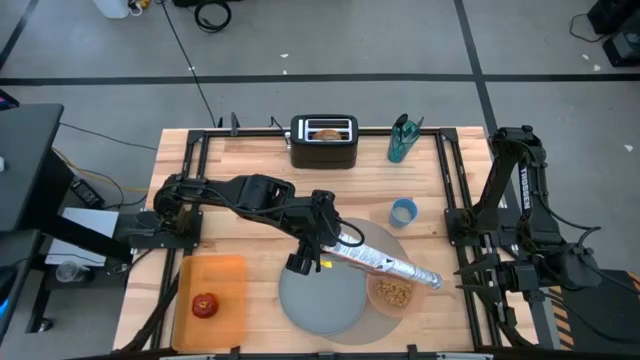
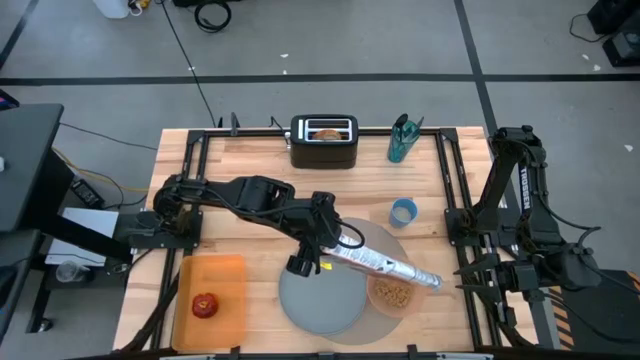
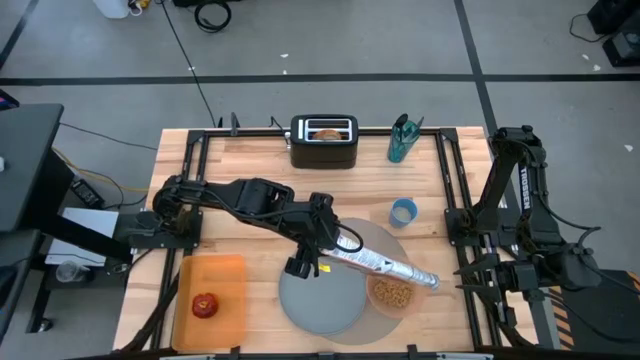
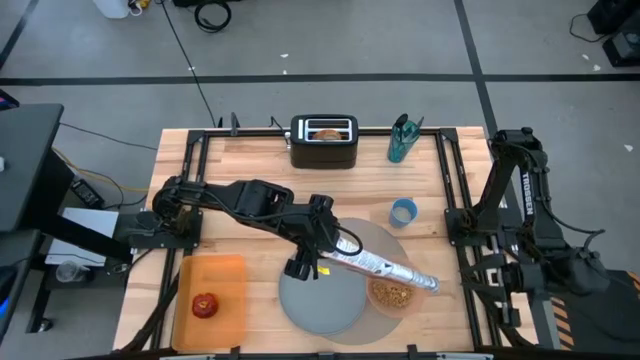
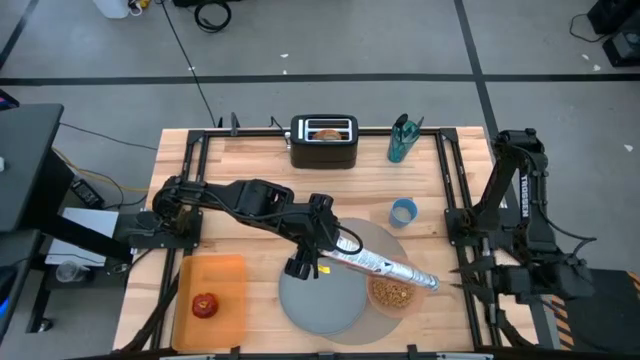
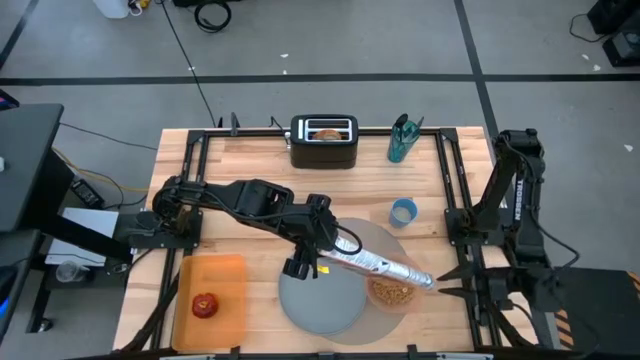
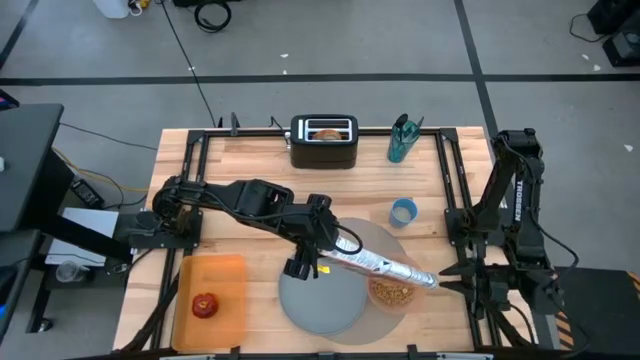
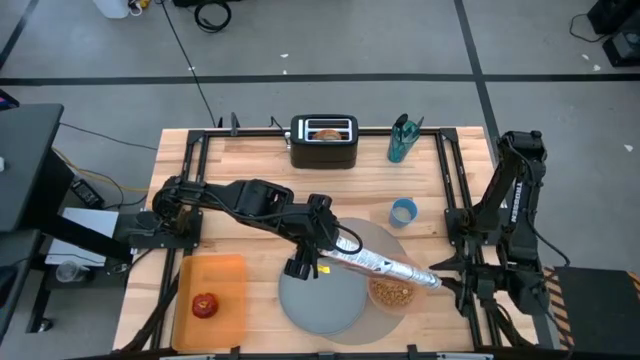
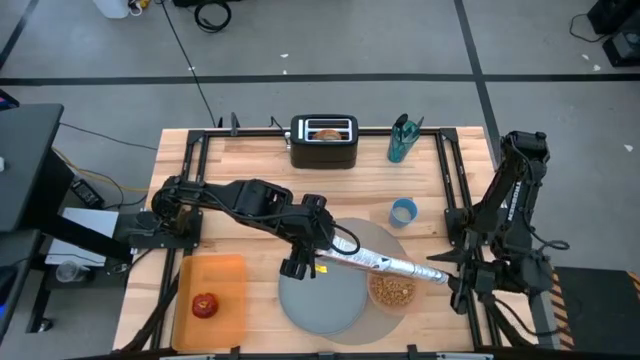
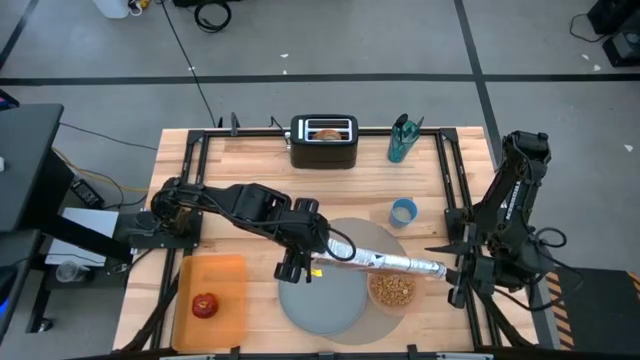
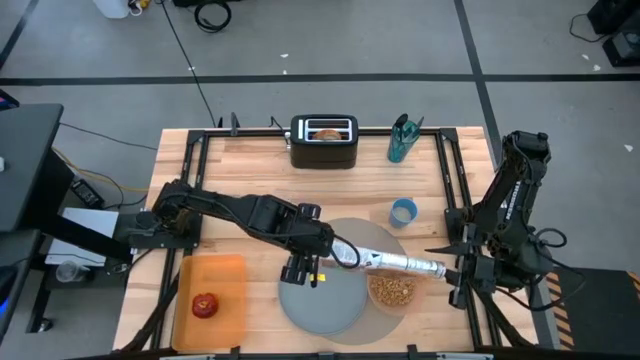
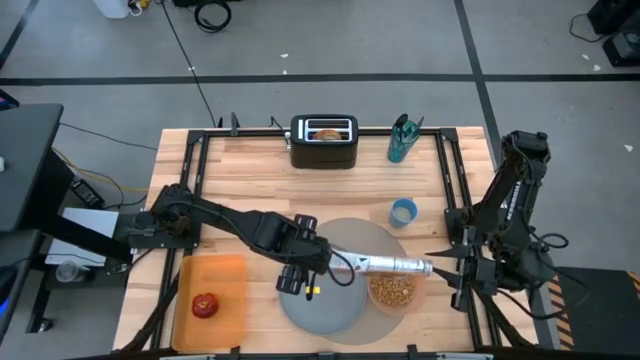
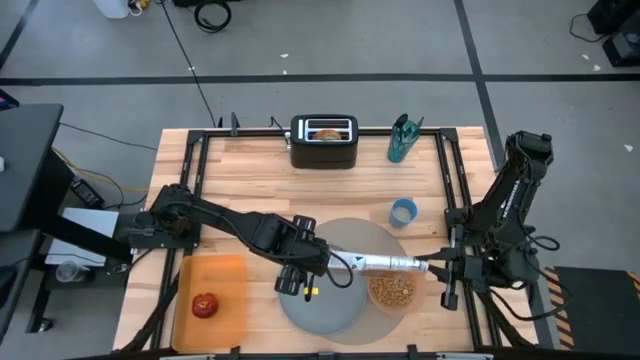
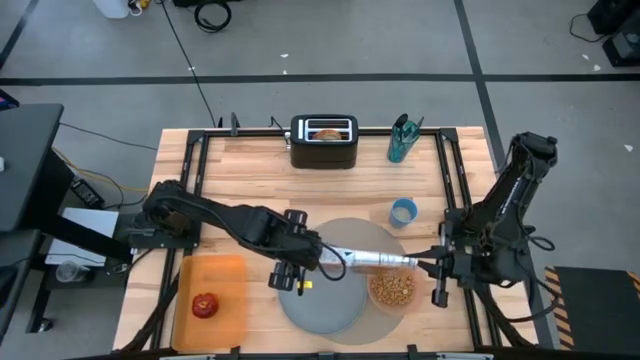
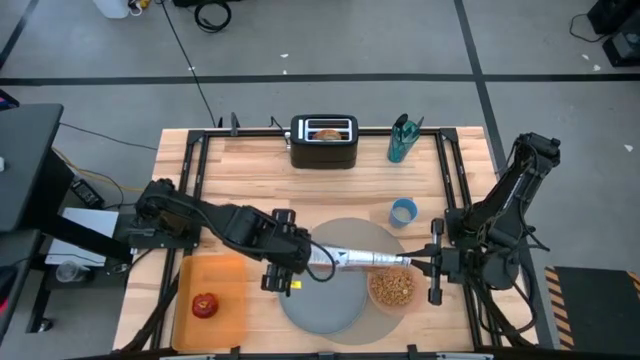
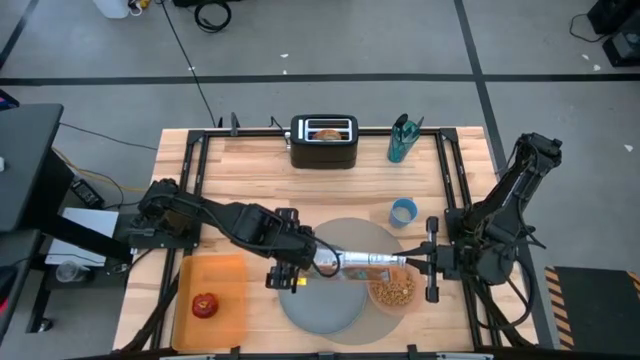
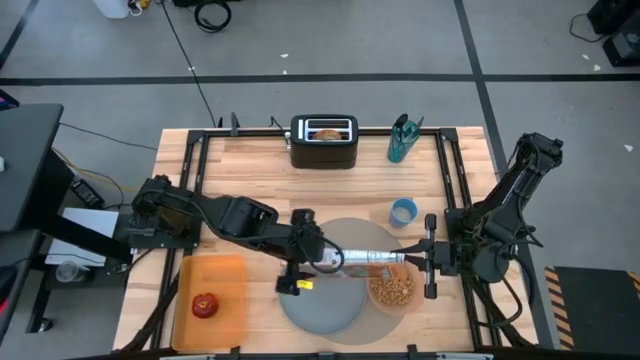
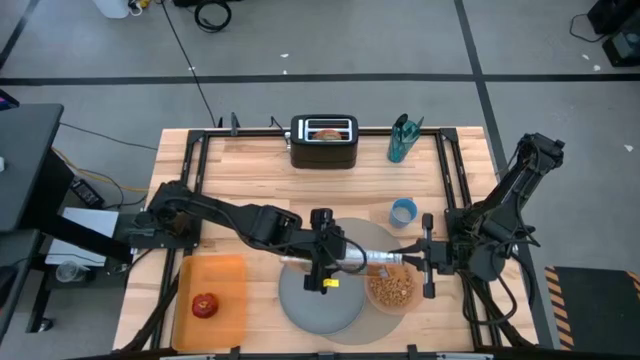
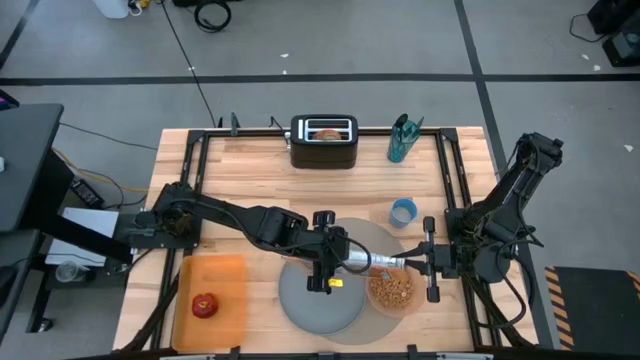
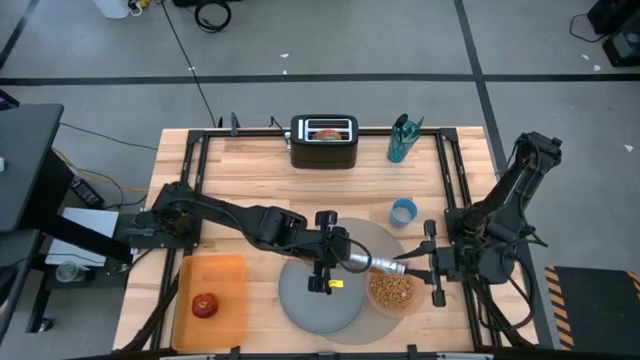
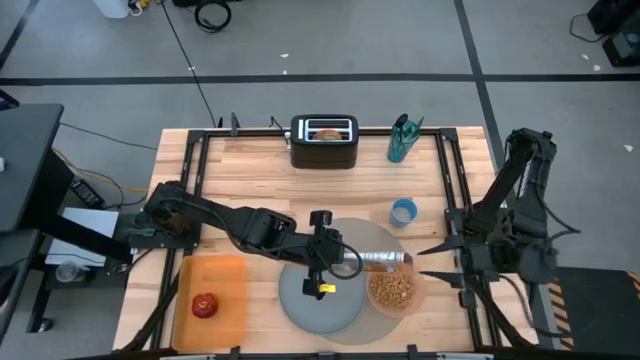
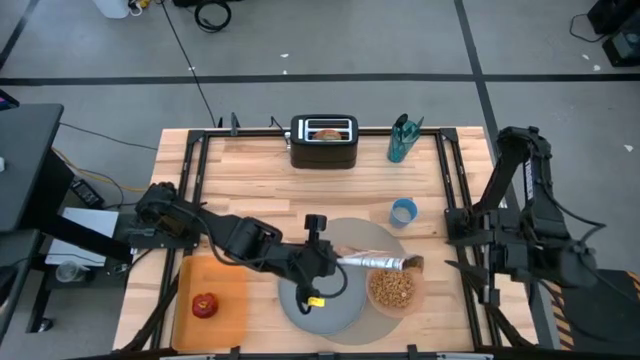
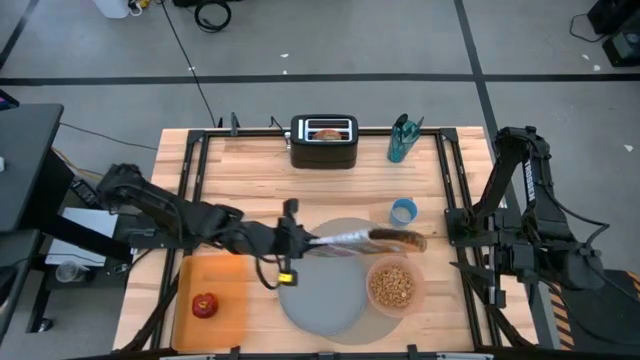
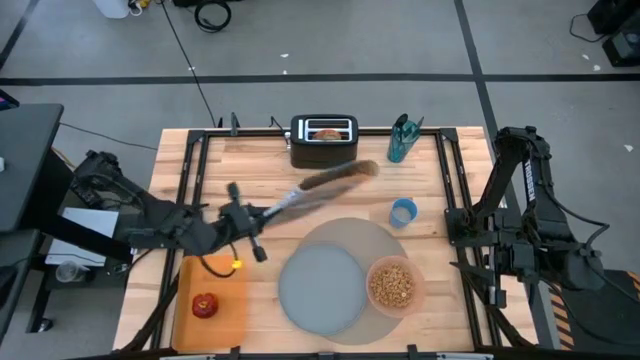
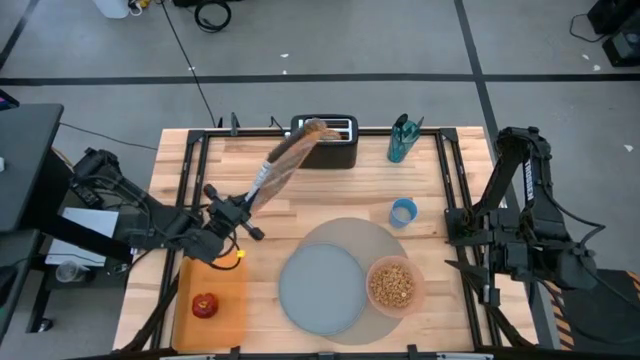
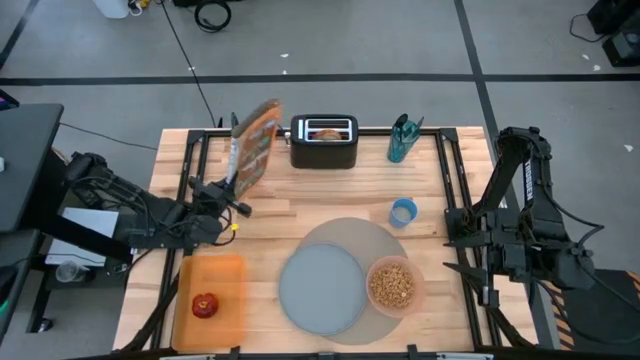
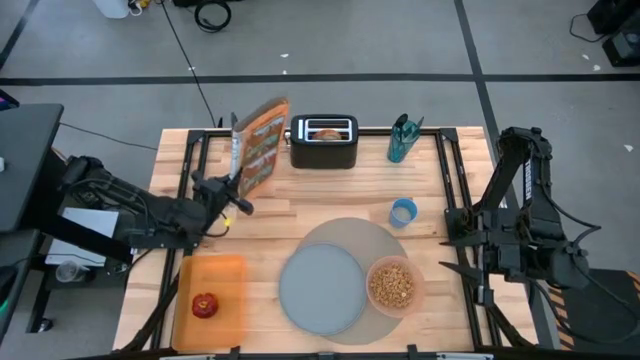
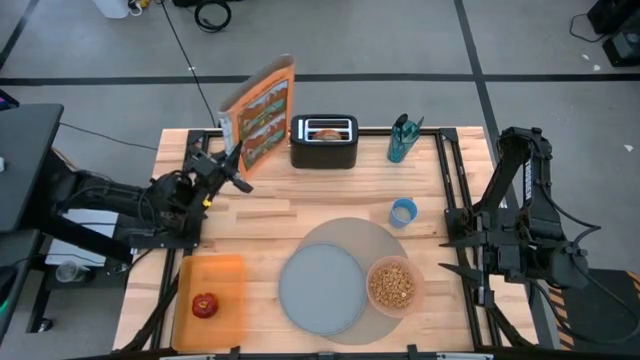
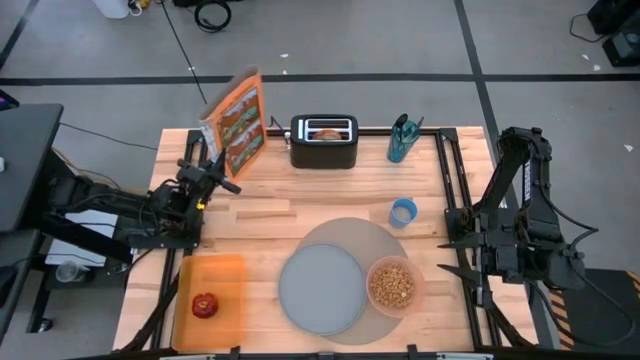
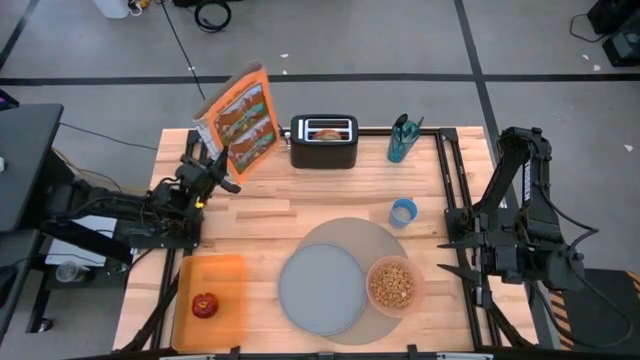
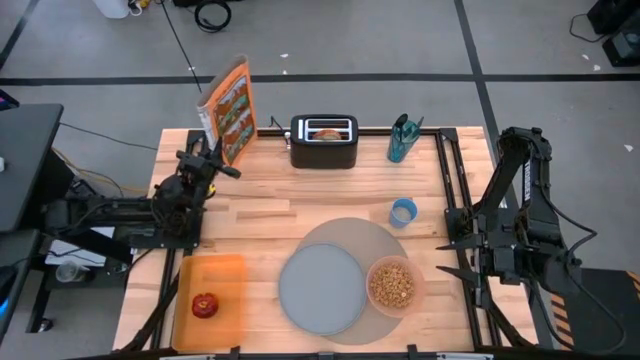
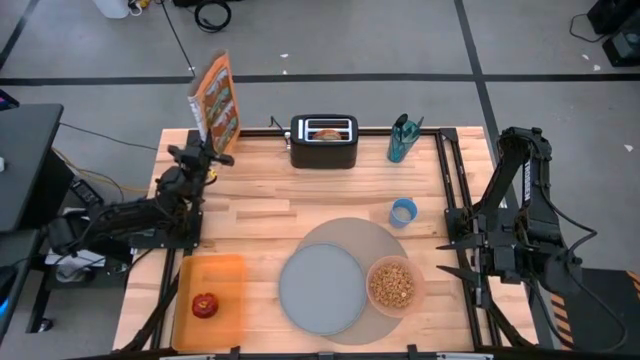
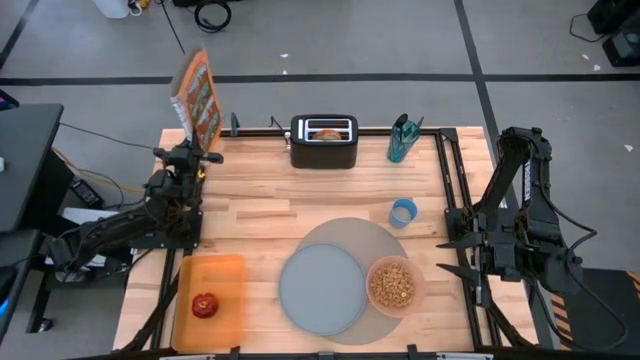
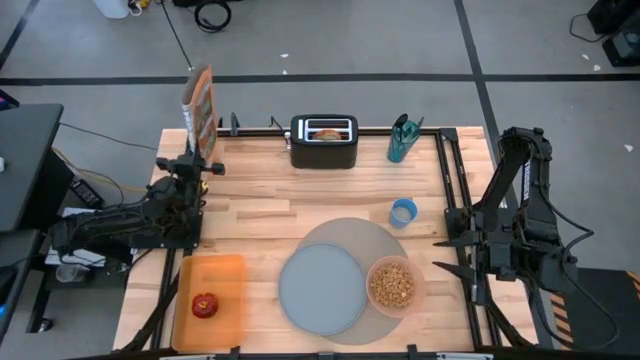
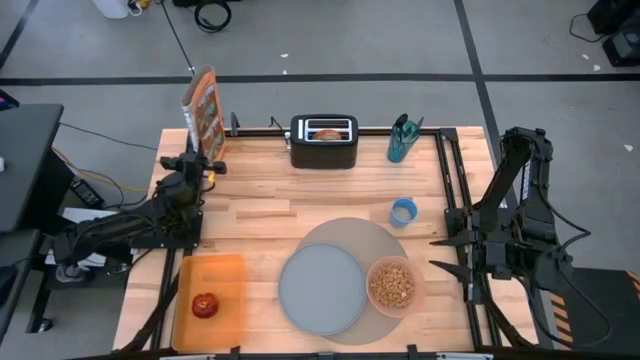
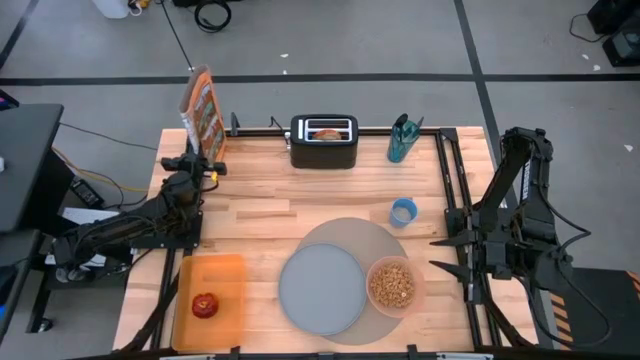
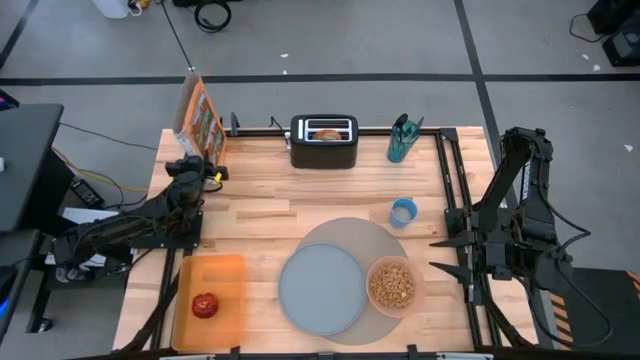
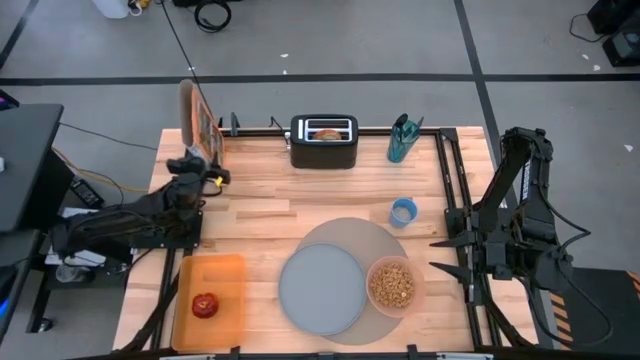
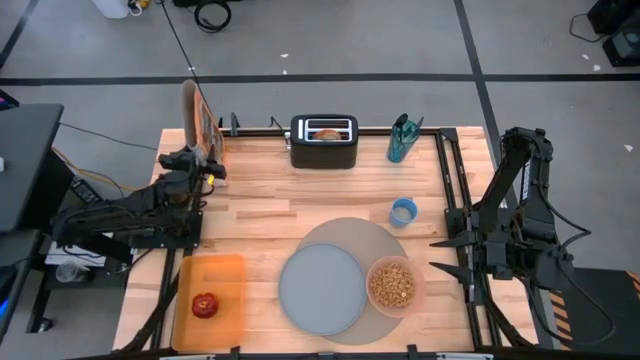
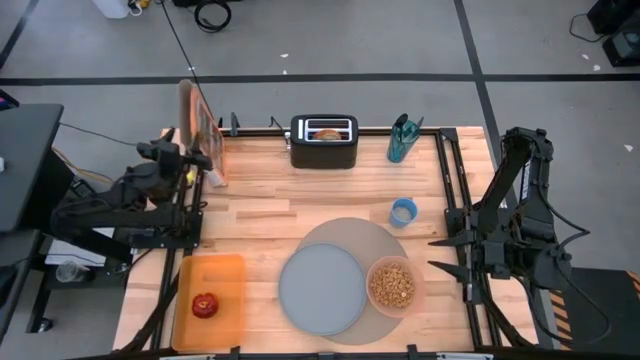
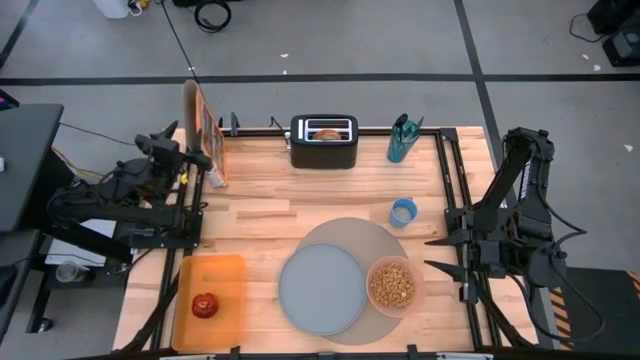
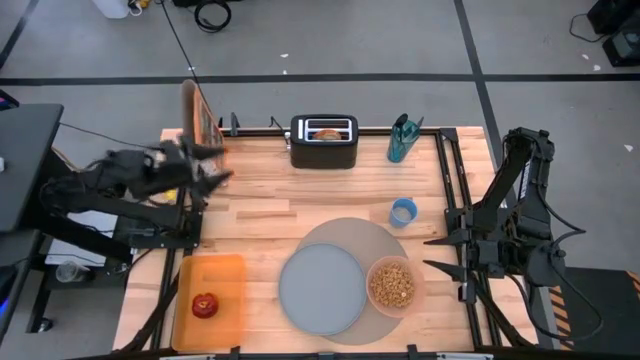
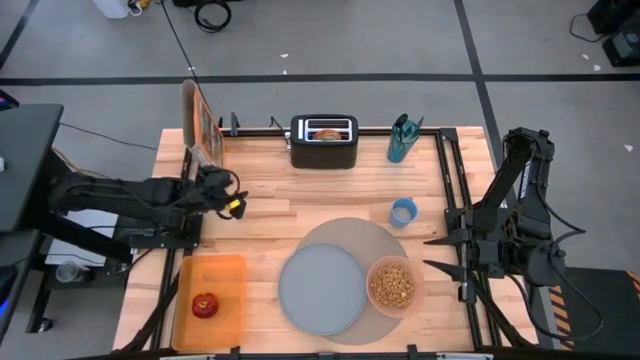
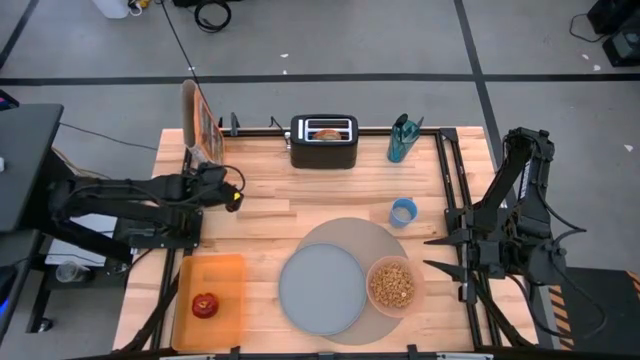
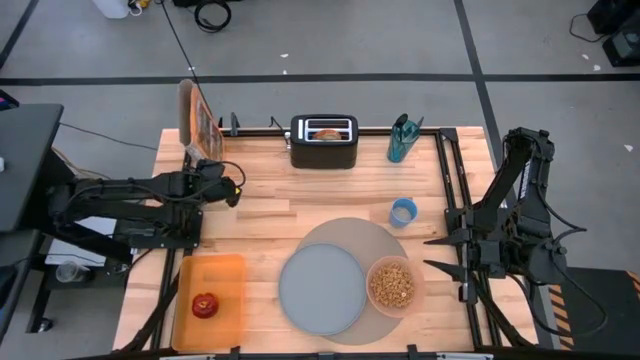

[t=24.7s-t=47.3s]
Task: Arrange a breakfast setting
Pour the cereal into the orange bowl
